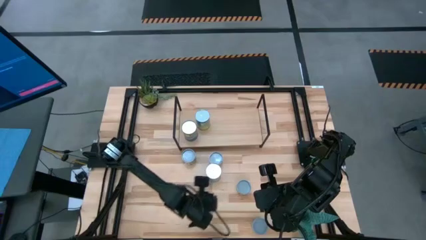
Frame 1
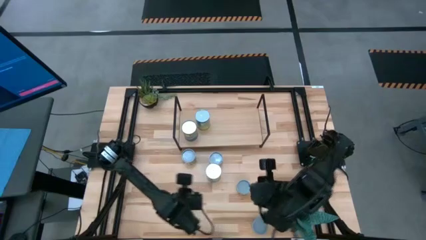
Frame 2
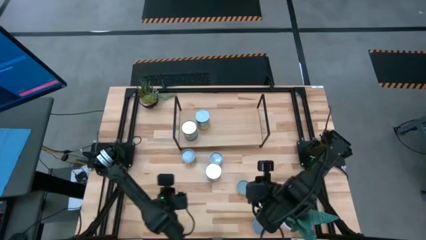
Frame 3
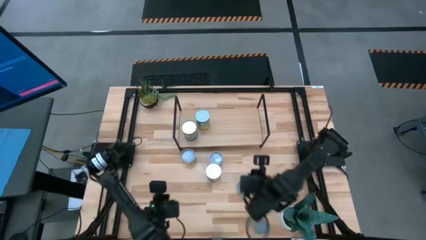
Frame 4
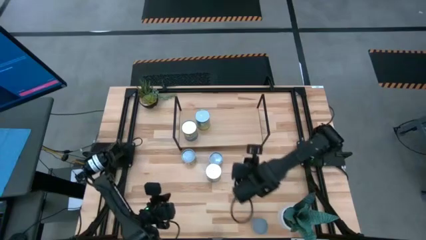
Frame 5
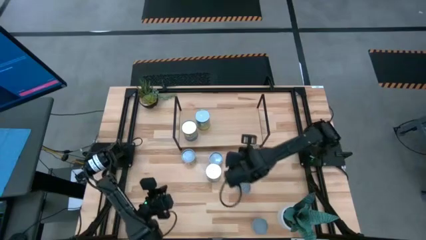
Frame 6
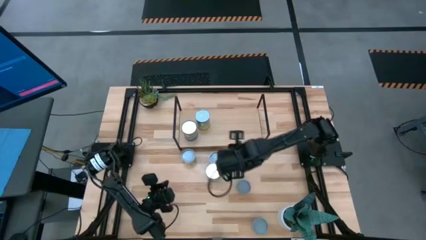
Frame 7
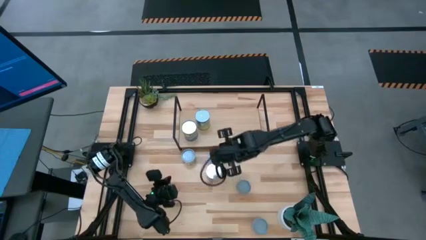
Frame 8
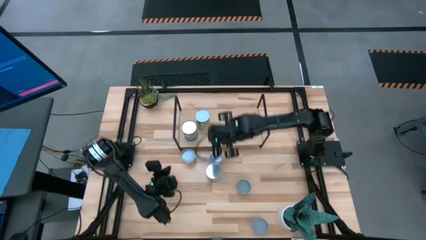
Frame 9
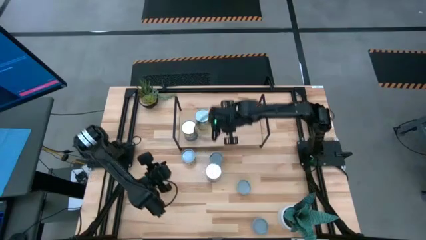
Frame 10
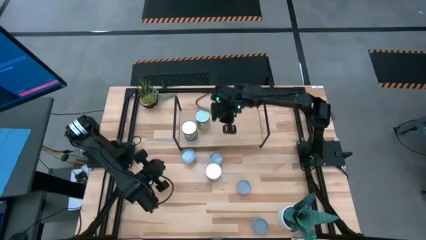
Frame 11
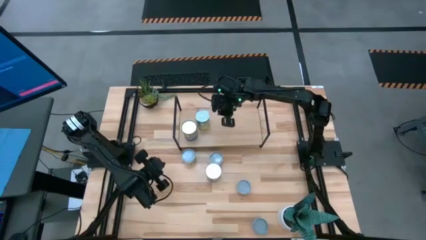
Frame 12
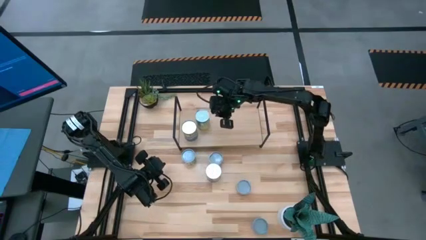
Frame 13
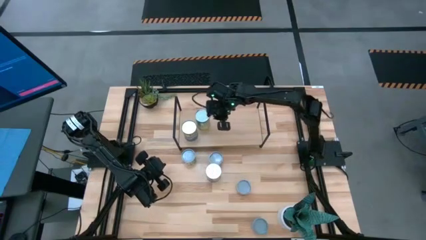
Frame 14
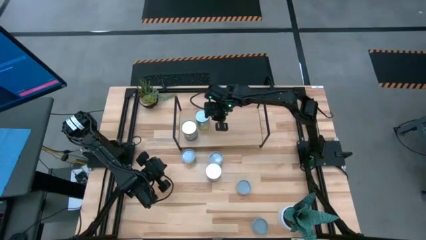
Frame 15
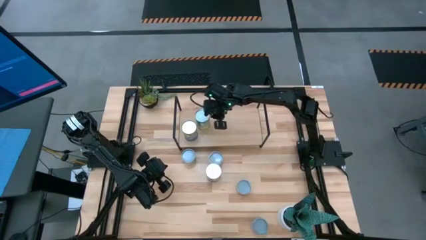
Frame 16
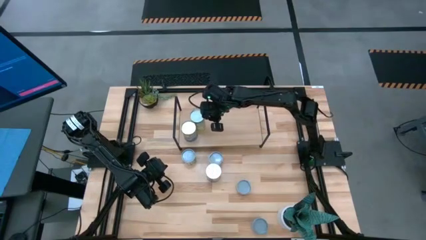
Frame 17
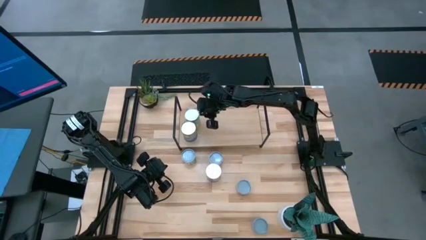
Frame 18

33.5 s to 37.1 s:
Task: Pick and place cans onto a shelf
Adjust the canned carrots

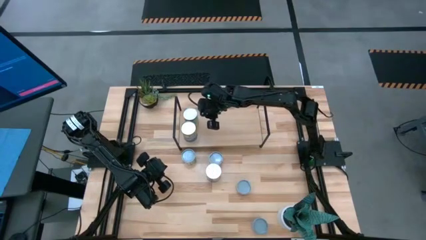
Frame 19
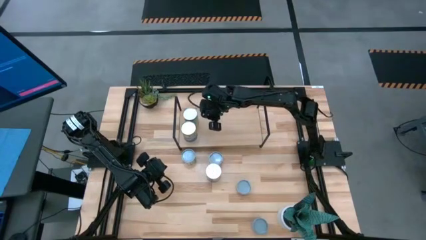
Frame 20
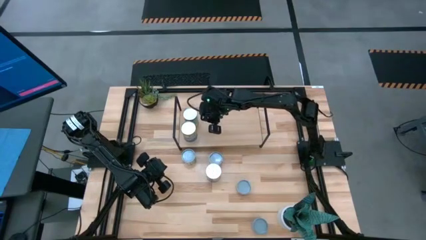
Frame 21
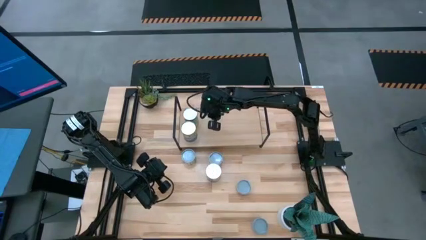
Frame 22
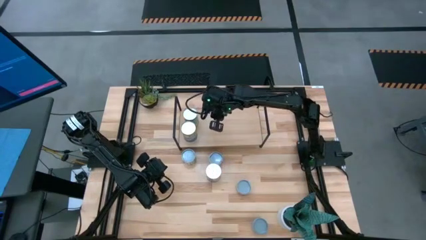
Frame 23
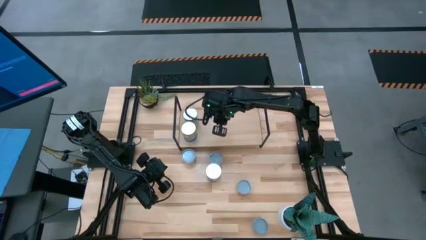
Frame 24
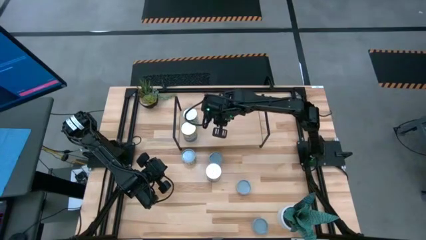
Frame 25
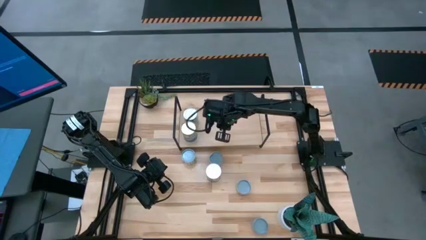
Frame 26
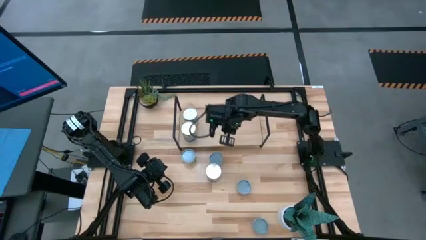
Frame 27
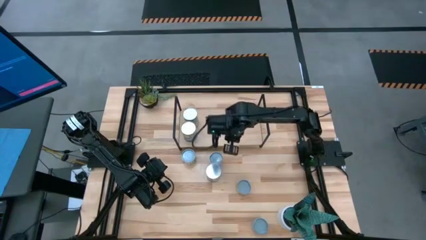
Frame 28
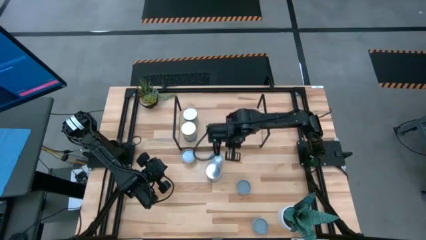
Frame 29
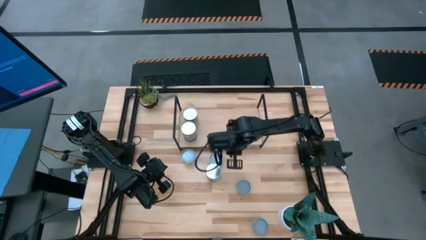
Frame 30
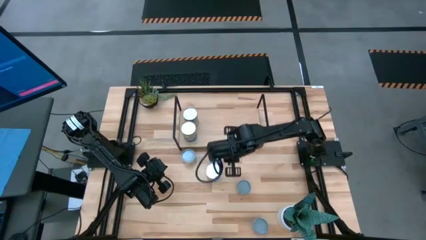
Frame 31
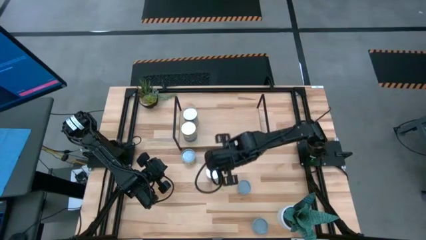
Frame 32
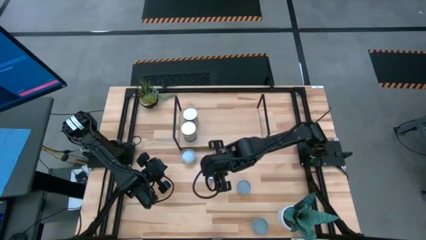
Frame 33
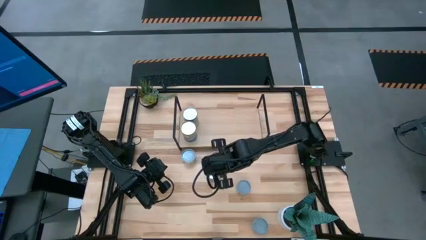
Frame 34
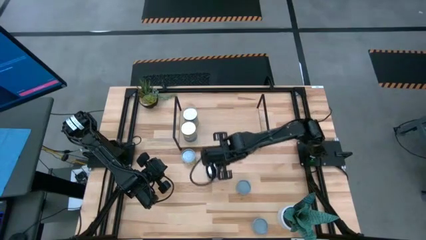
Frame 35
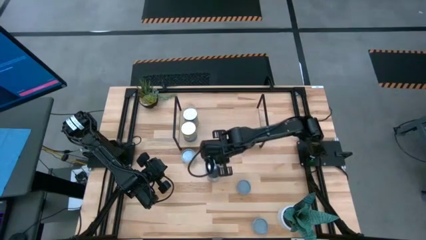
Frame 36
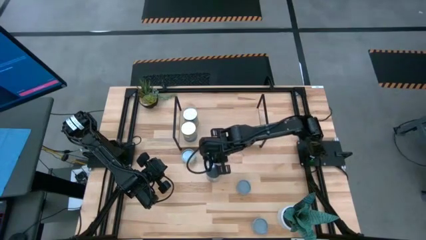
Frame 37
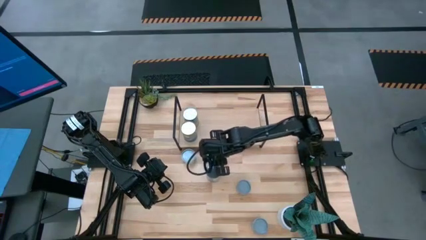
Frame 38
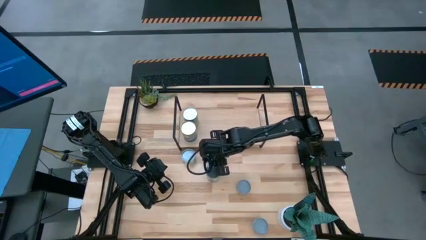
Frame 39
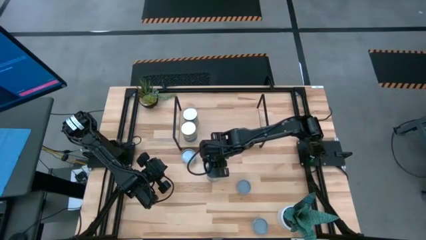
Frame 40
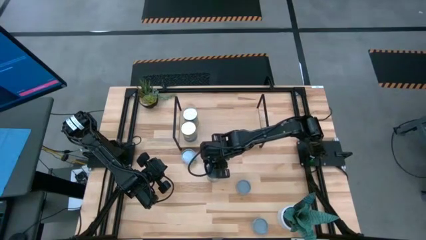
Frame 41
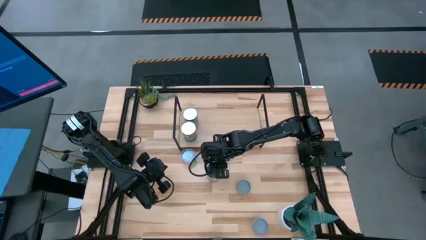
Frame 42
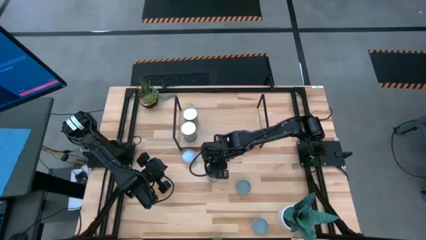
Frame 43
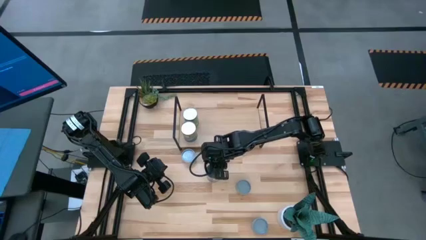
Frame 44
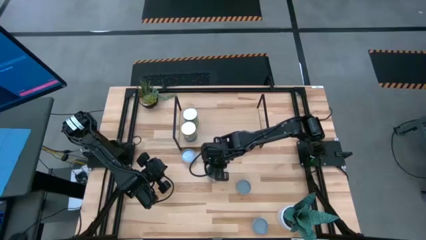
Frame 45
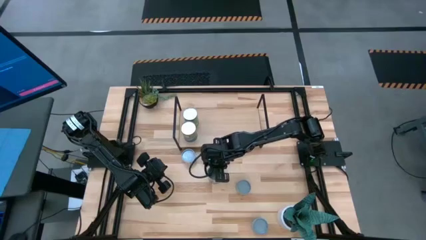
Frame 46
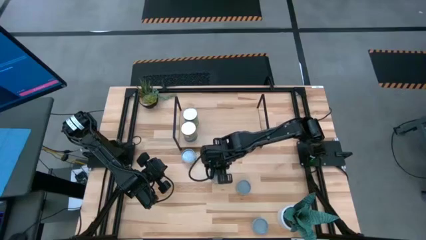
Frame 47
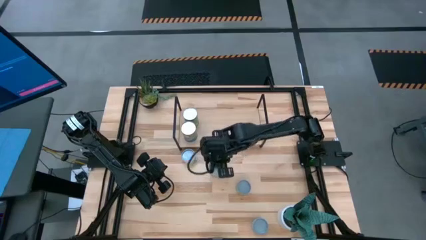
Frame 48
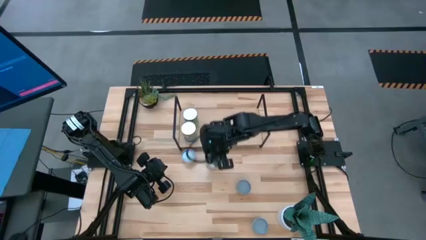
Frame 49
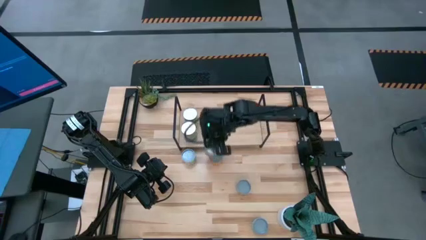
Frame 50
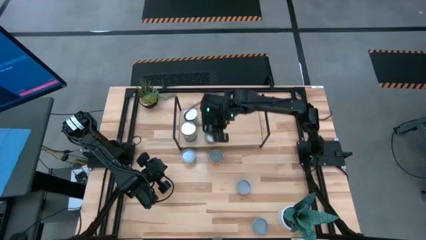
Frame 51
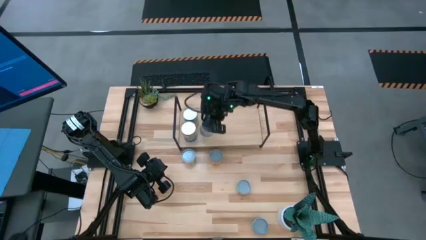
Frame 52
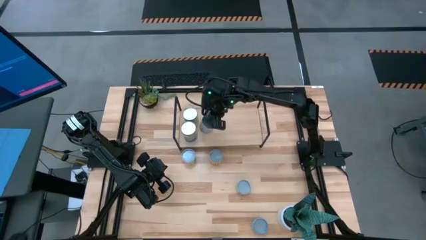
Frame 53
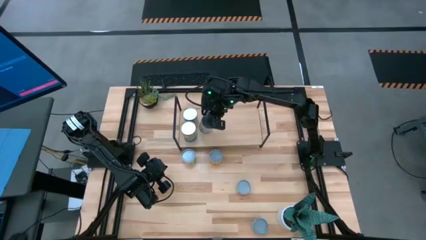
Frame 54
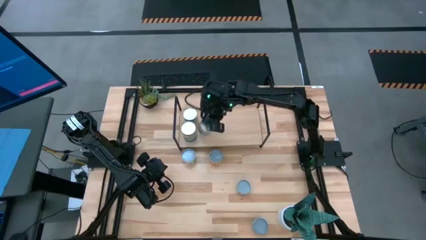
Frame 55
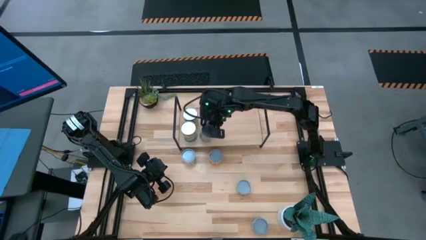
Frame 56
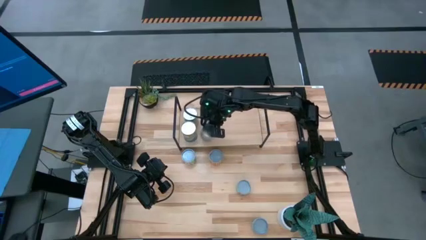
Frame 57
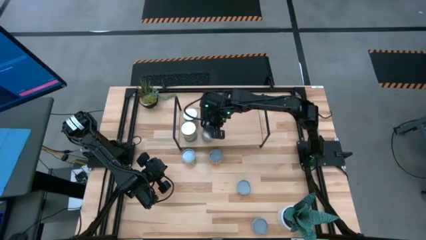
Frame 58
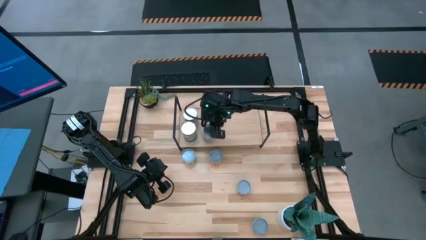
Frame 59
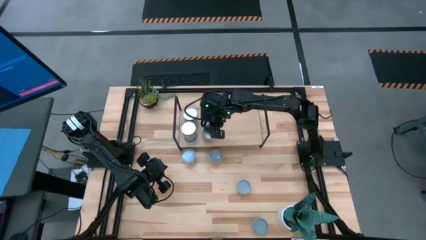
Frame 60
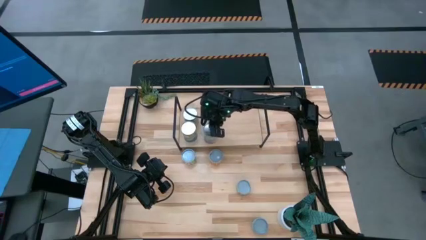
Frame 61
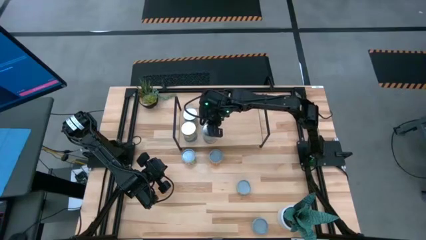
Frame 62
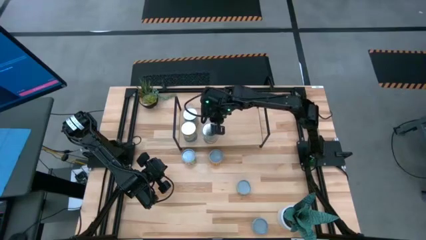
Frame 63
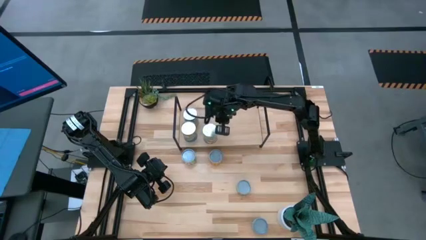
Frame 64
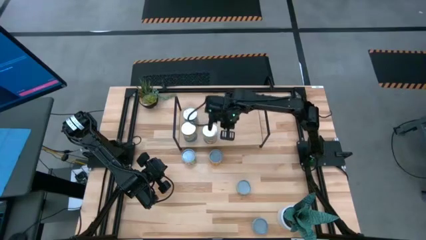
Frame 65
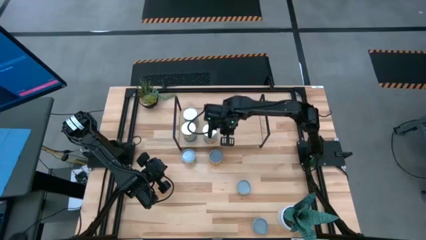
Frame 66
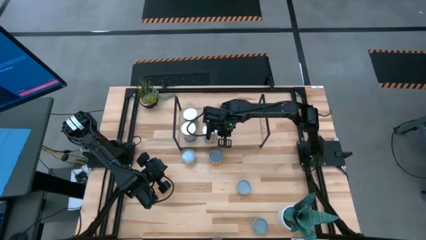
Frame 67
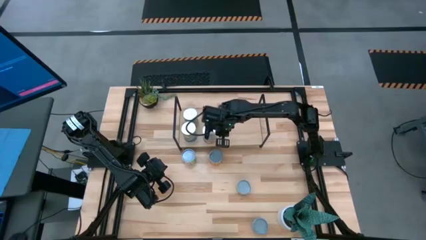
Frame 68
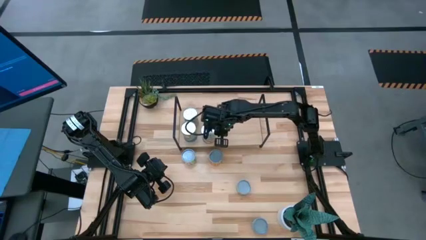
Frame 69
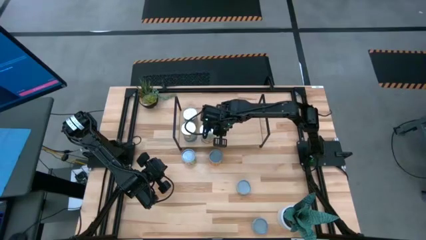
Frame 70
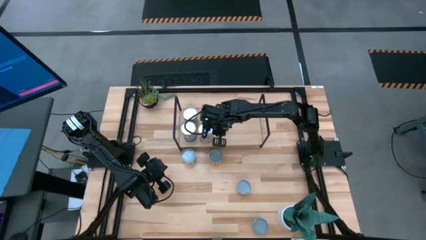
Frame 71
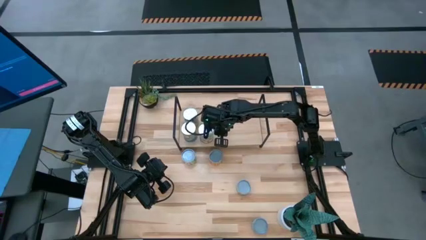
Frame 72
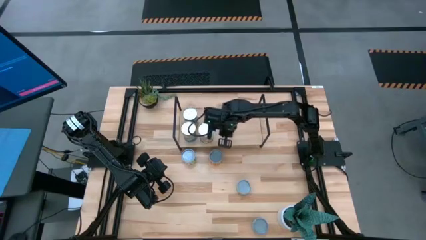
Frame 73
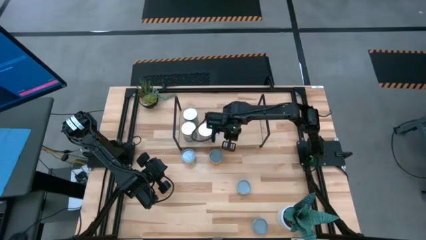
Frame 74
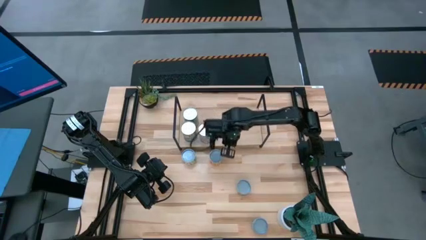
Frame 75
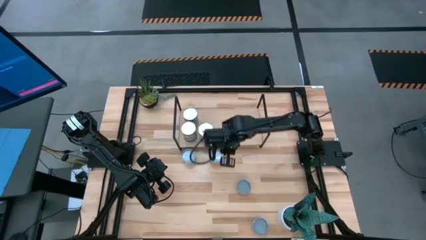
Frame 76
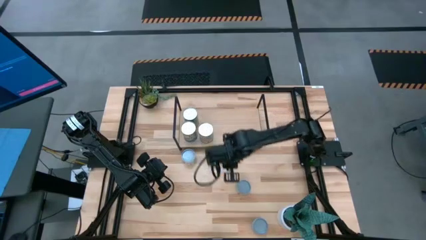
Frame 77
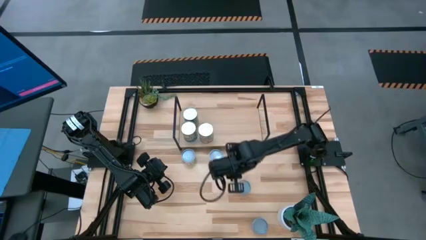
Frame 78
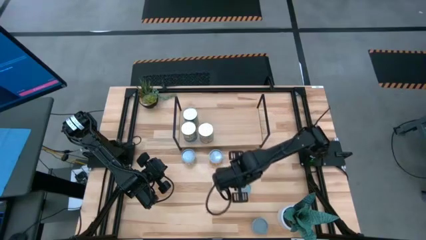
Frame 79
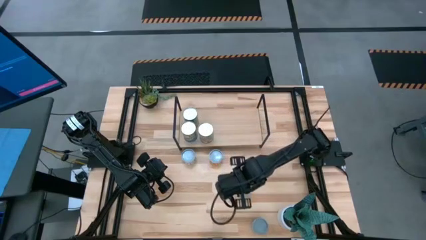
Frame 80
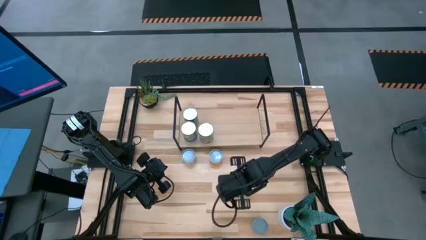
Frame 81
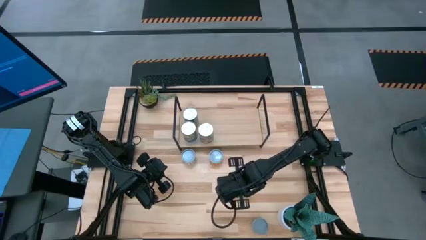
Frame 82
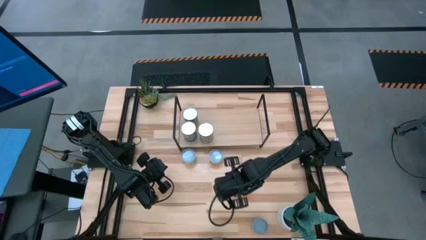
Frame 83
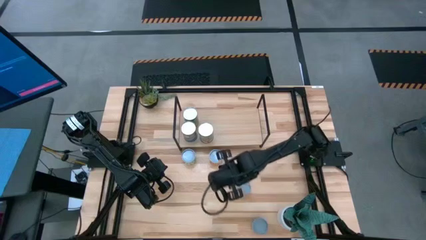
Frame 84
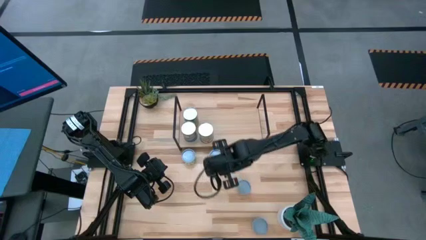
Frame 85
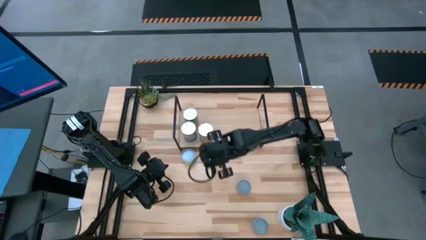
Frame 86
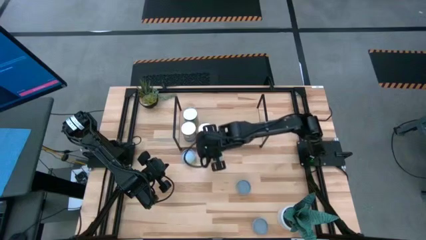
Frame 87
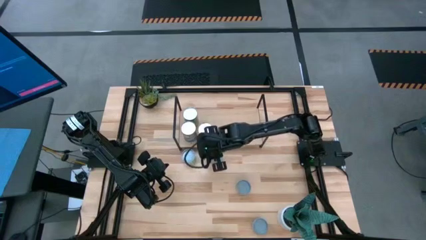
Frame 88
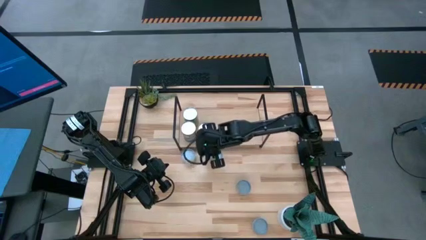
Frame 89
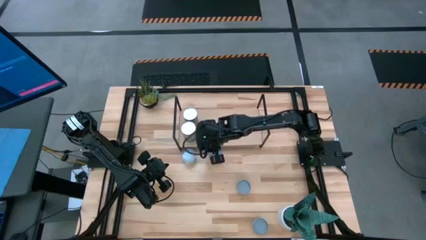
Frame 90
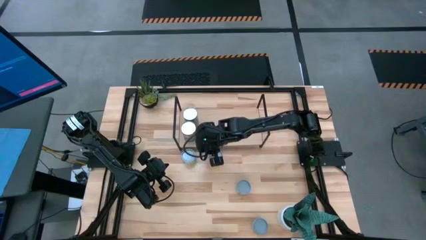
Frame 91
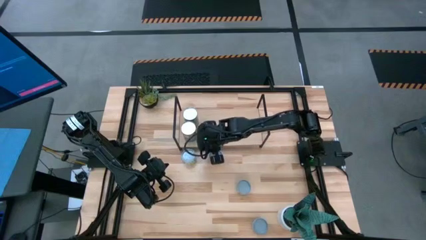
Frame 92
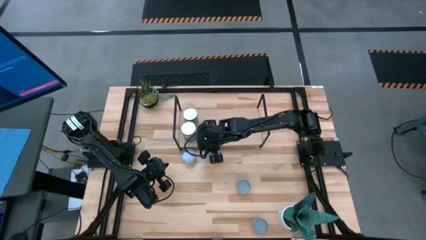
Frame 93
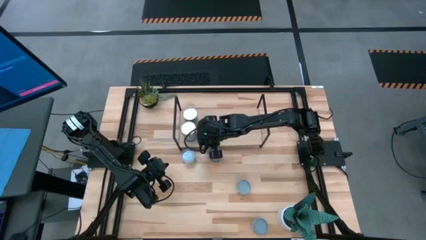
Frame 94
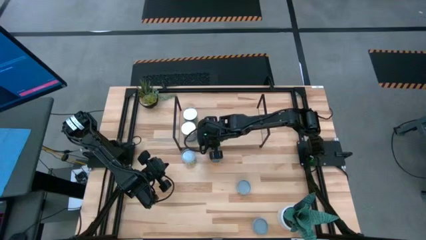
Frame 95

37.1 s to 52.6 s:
Put the canned peaches on the shelf
